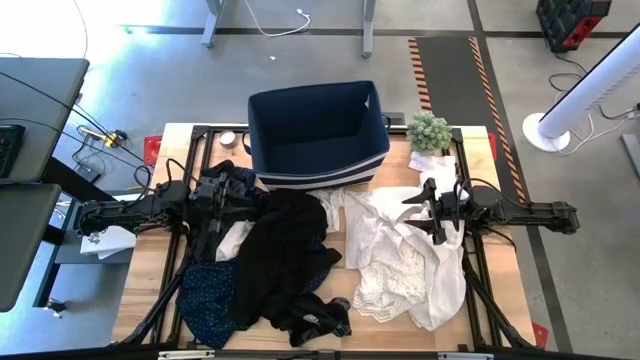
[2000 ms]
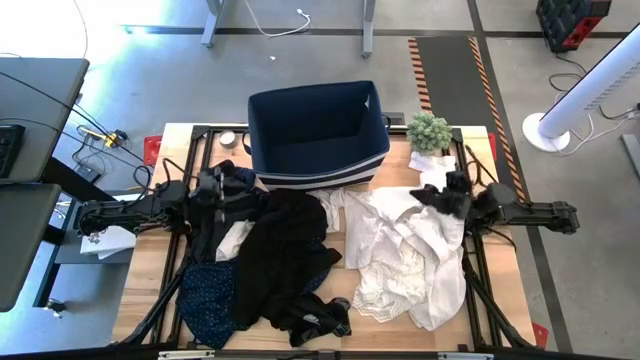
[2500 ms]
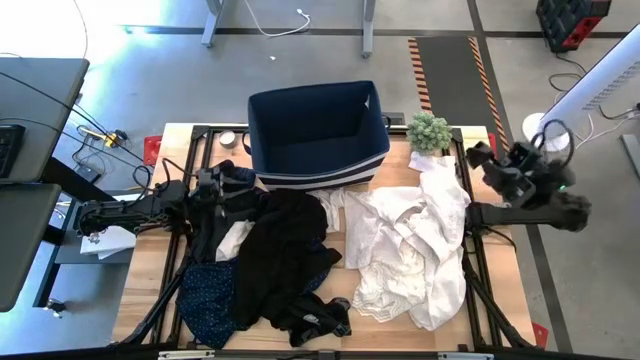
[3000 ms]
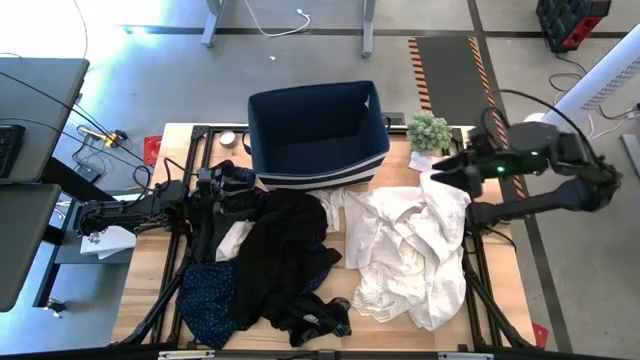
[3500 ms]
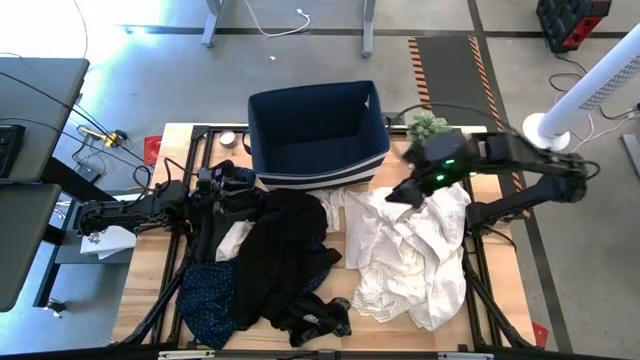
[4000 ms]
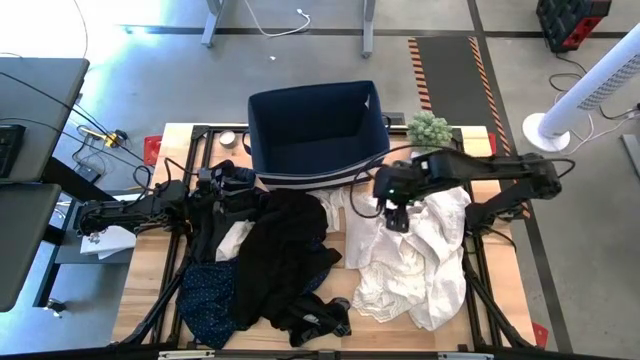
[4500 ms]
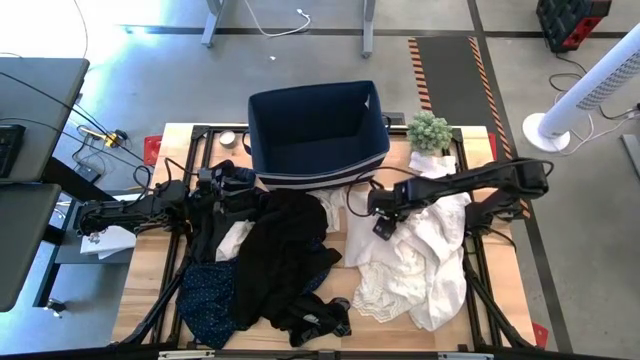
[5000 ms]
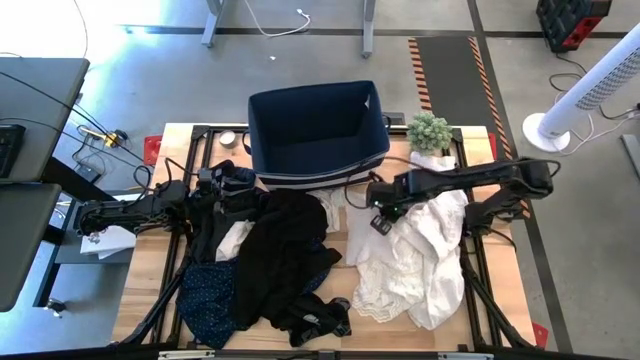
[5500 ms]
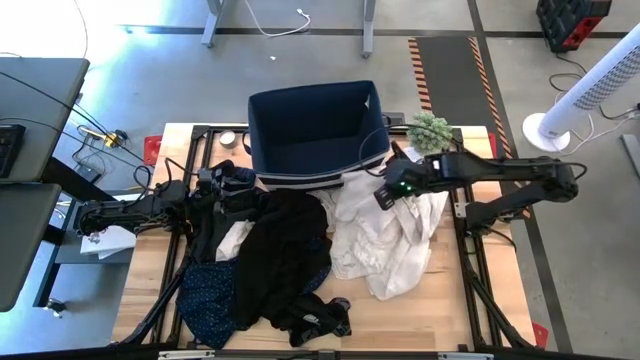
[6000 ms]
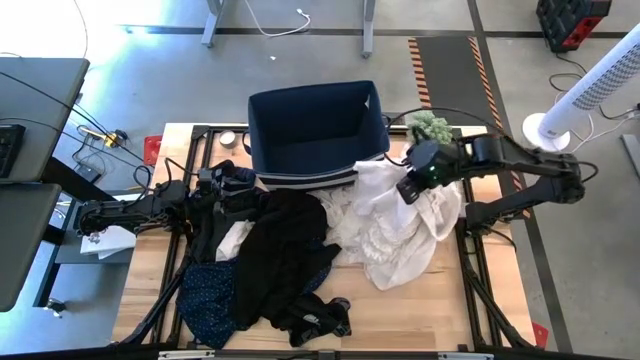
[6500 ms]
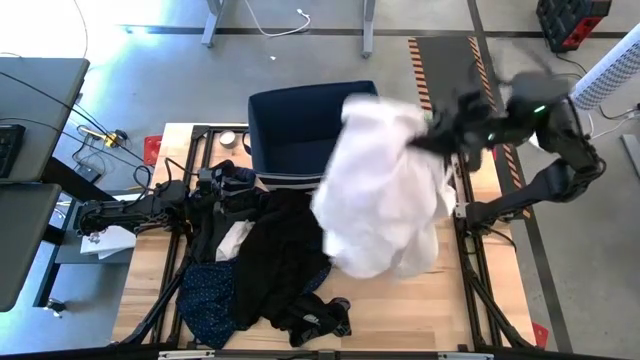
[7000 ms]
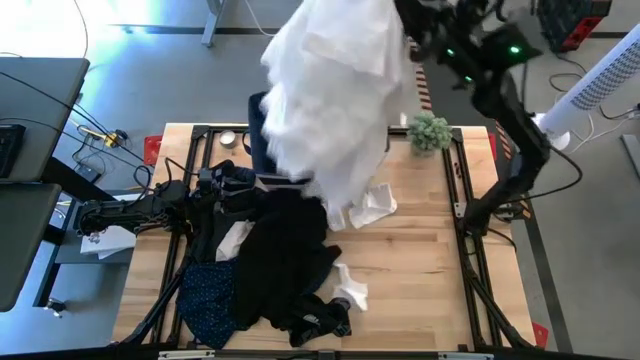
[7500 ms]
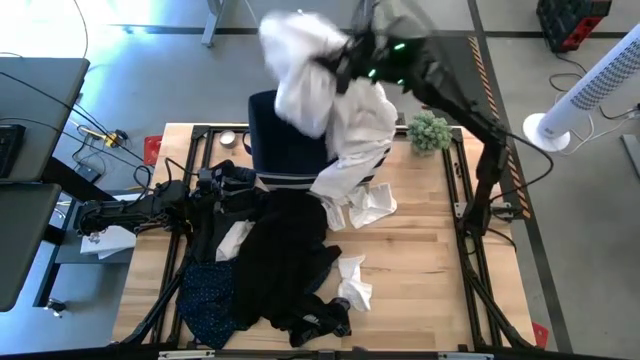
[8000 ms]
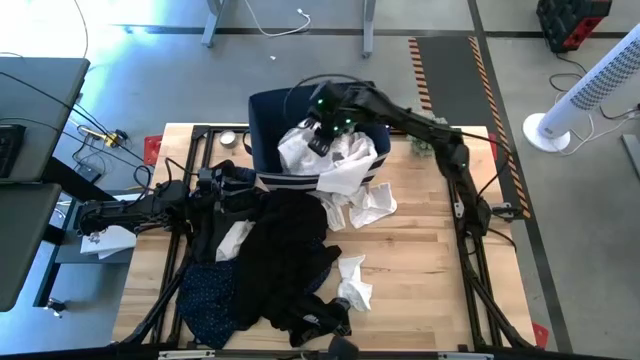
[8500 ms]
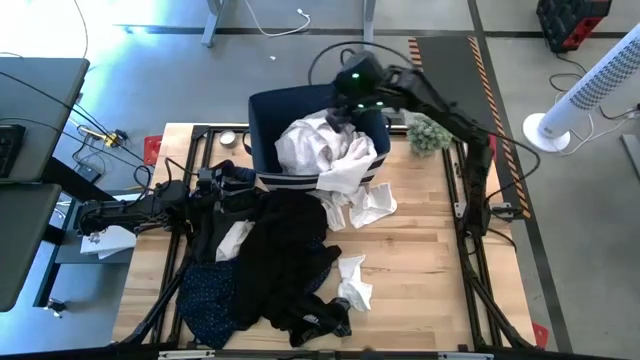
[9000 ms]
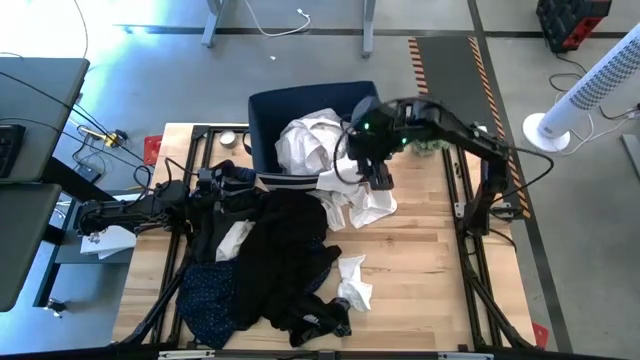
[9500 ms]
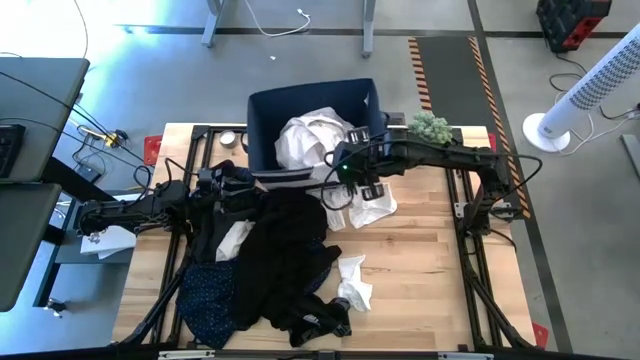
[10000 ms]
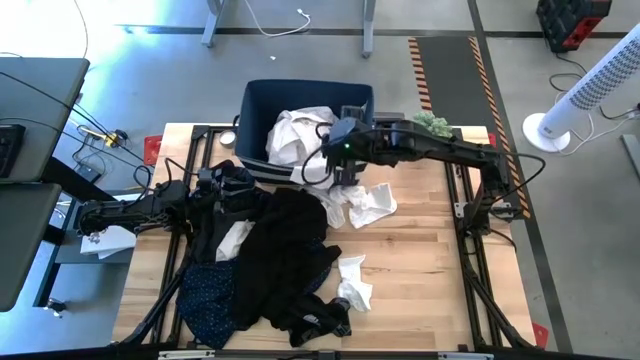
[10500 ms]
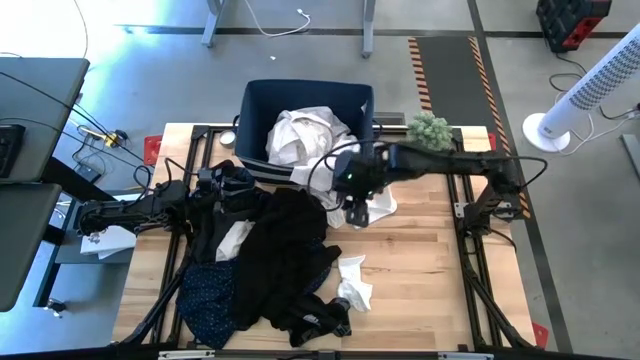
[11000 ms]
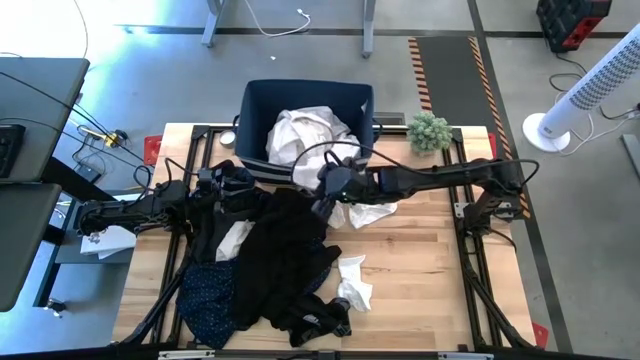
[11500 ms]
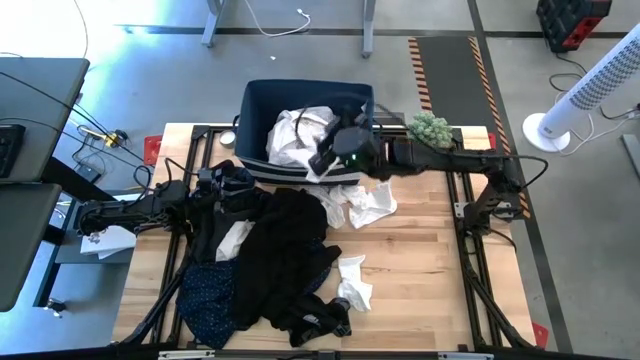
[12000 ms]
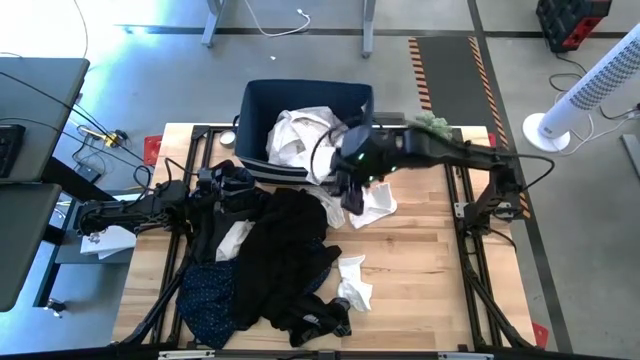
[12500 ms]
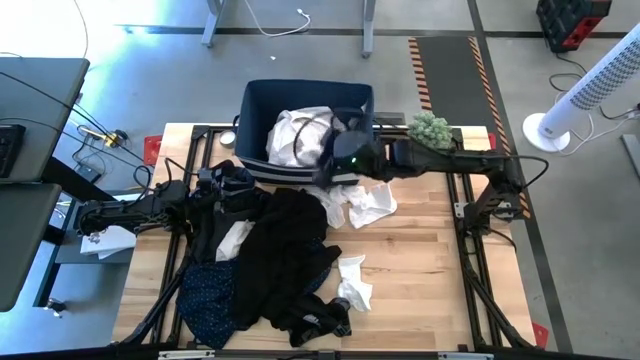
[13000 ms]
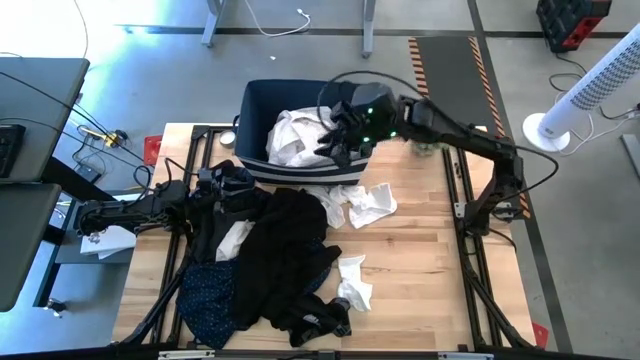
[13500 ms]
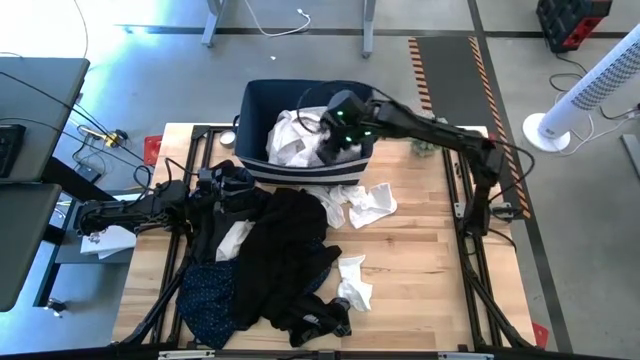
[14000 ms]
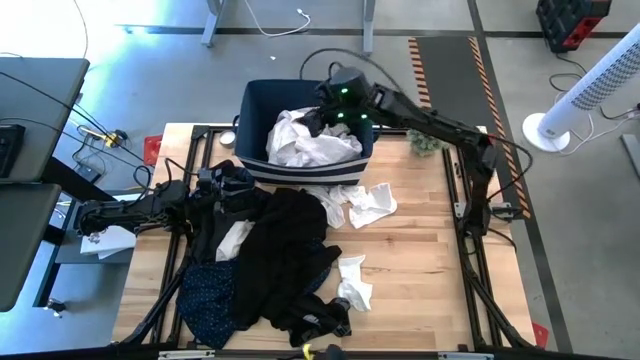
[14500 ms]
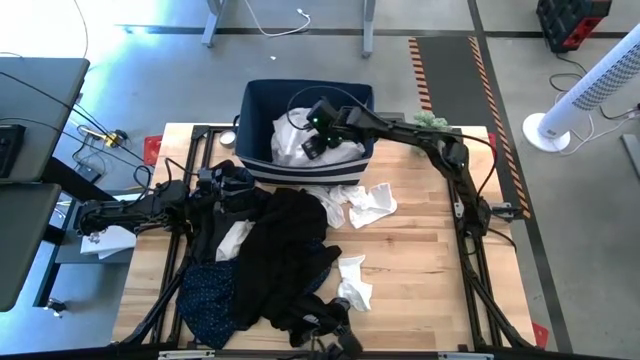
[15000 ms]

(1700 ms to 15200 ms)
Task: Sort clothes
Put the white-sleeved shirt into the laundry bin

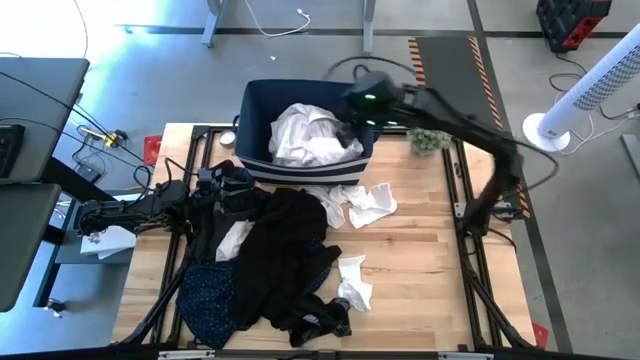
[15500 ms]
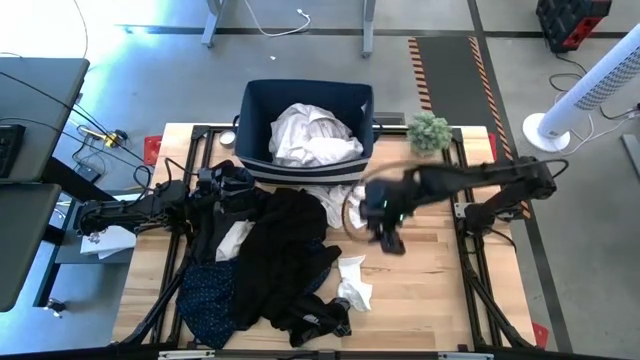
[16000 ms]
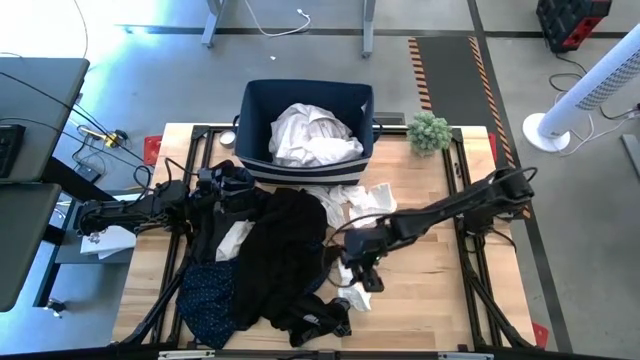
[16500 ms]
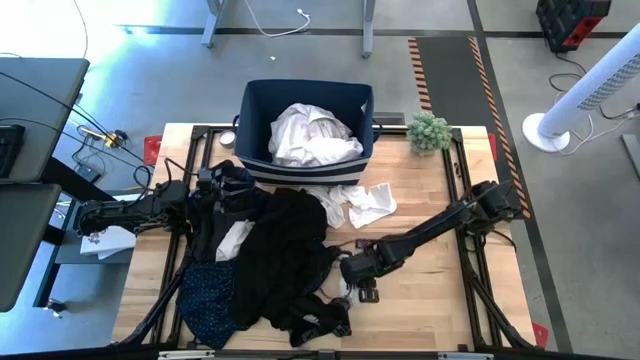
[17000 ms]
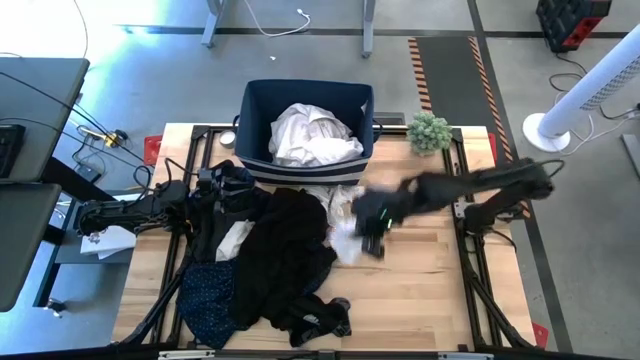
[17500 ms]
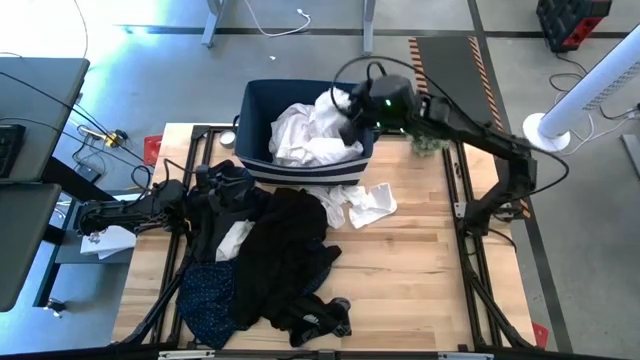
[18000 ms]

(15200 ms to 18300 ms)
Put the bottom right white sock into the laundry bin

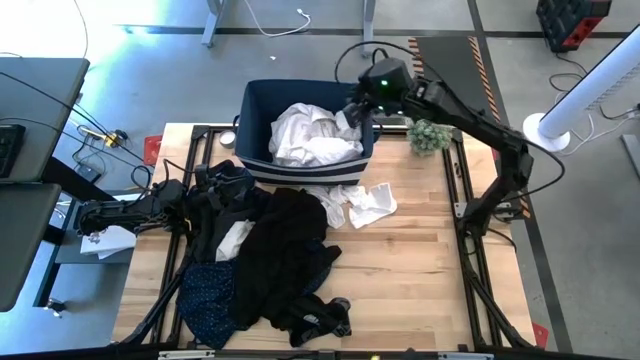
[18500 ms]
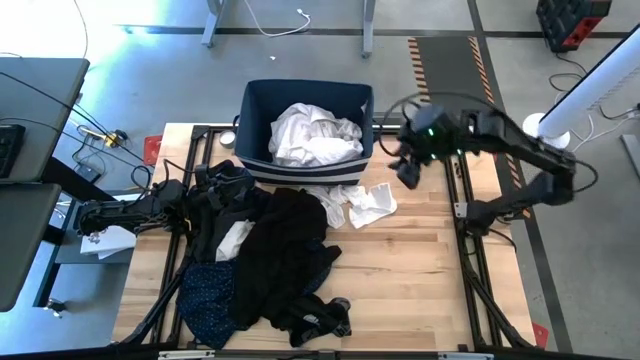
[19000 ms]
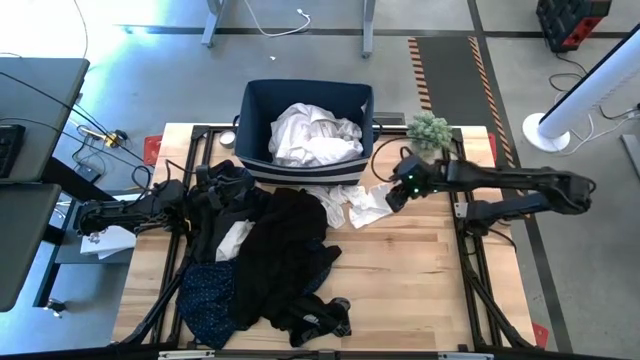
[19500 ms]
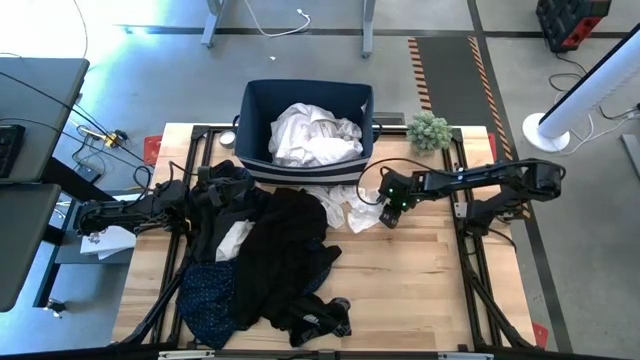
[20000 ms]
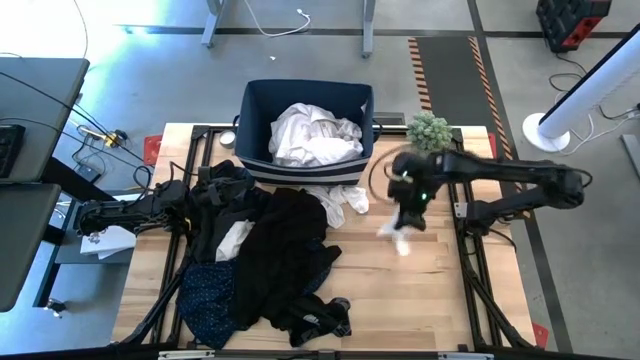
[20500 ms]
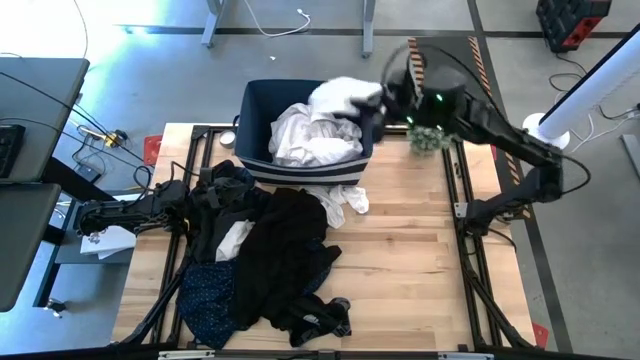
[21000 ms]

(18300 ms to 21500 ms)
Put the top right white sock into the laundry bin

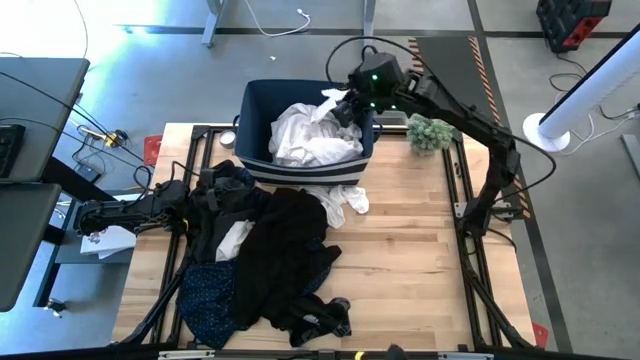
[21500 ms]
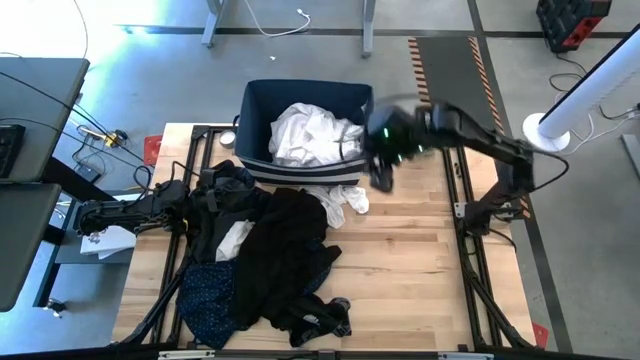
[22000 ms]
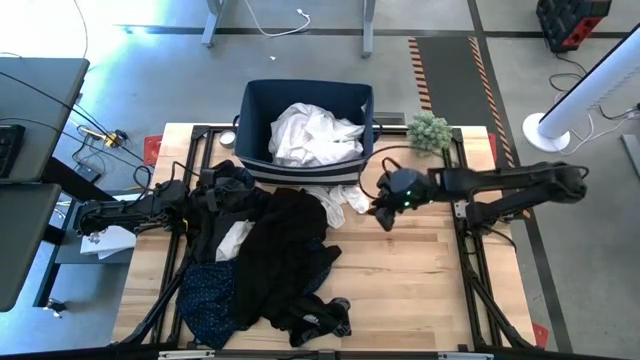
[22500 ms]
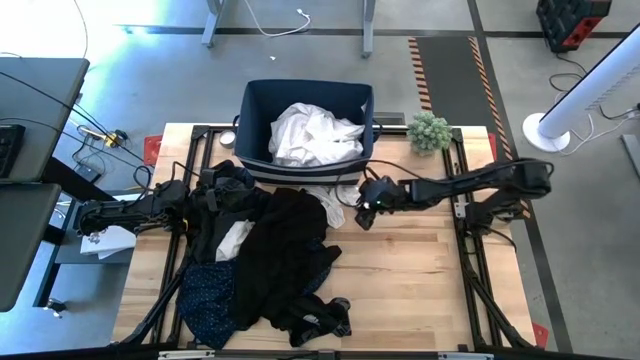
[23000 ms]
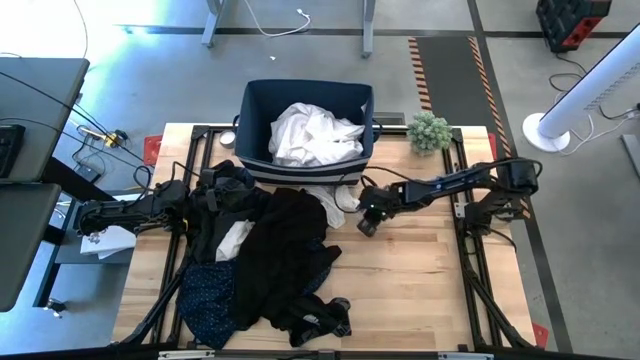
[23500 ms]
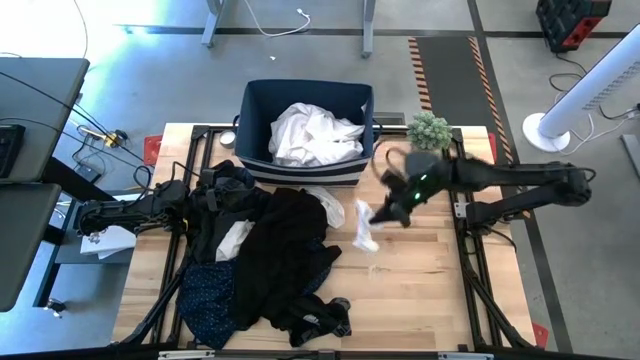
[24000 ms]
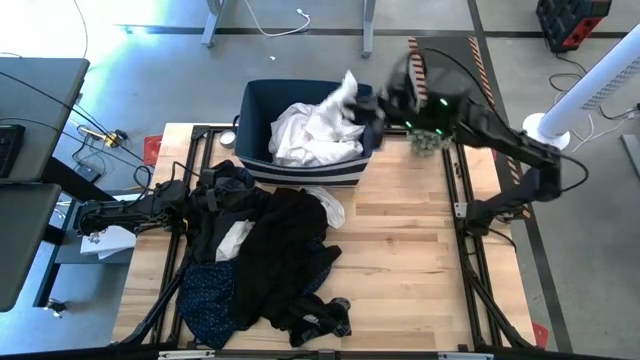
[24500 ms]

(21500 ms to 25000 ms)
Put the top right white sock into the laundry bin
